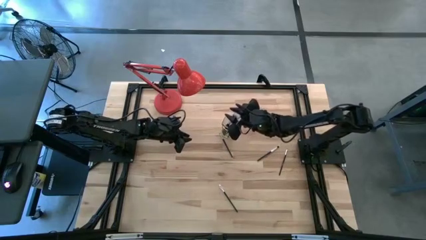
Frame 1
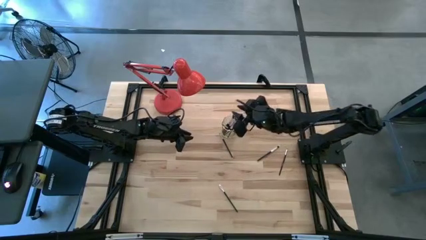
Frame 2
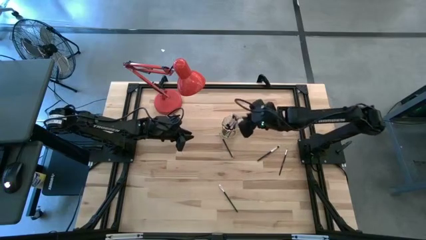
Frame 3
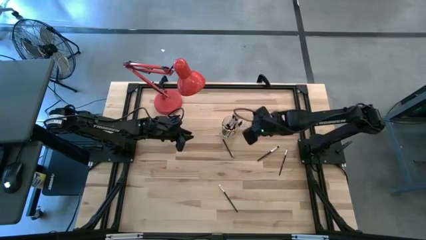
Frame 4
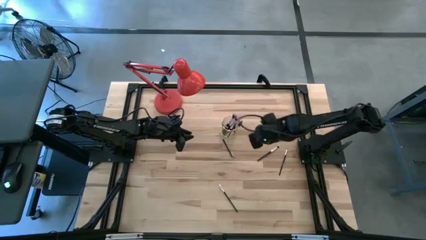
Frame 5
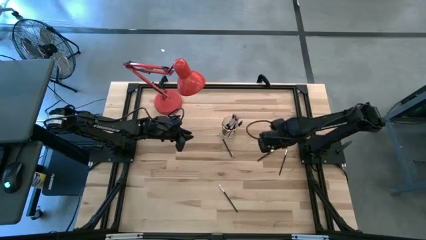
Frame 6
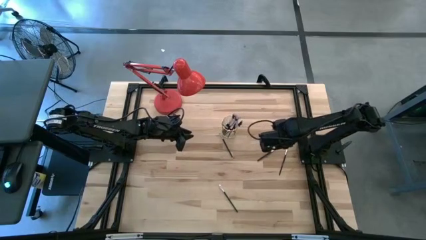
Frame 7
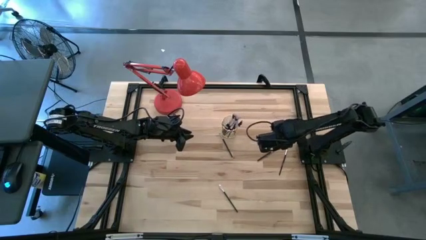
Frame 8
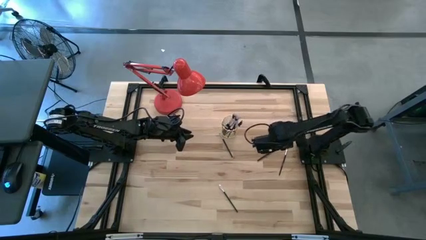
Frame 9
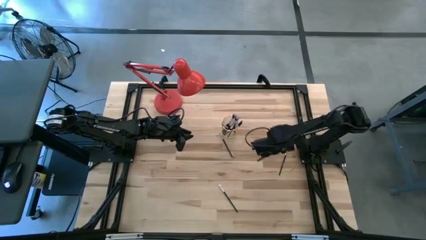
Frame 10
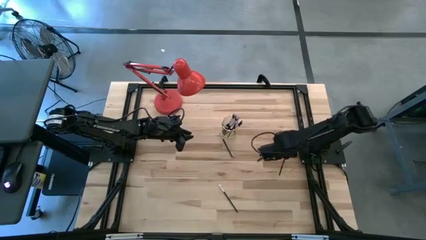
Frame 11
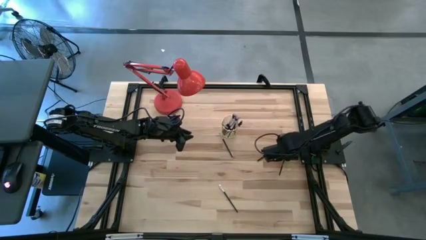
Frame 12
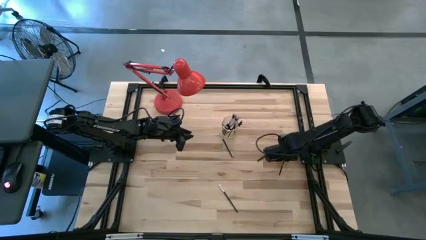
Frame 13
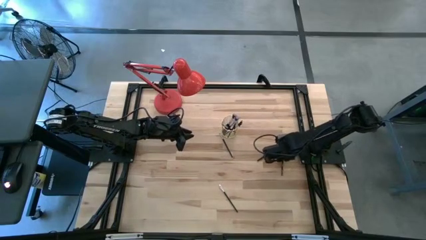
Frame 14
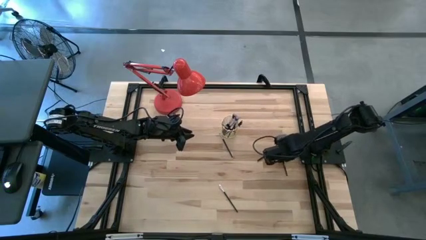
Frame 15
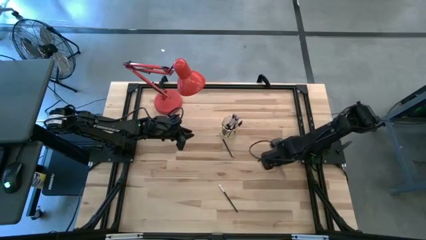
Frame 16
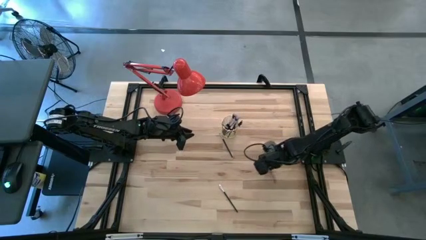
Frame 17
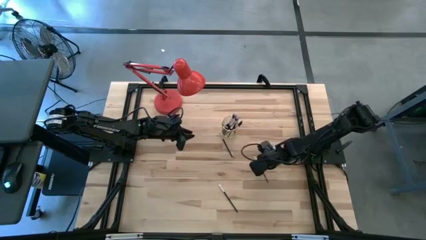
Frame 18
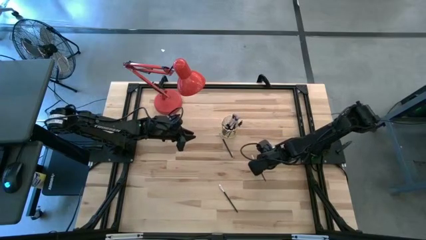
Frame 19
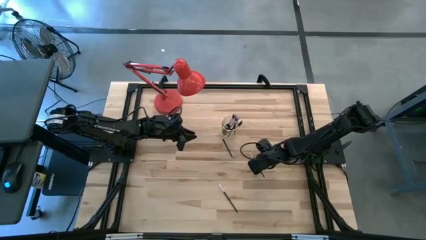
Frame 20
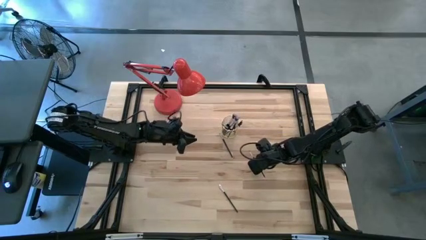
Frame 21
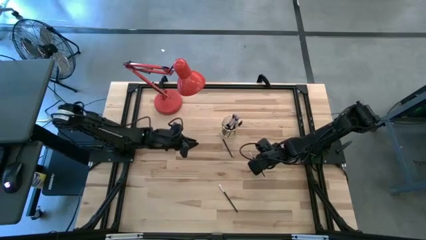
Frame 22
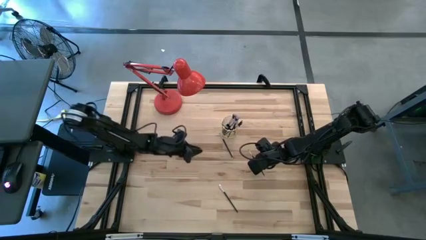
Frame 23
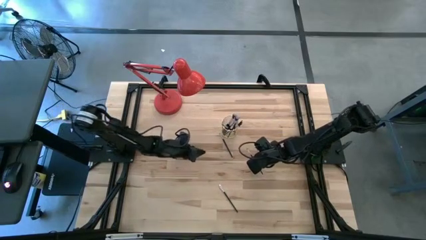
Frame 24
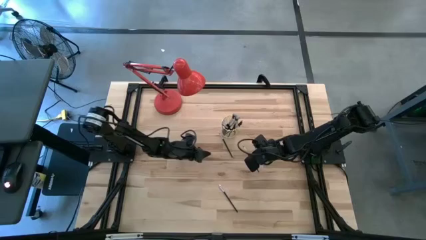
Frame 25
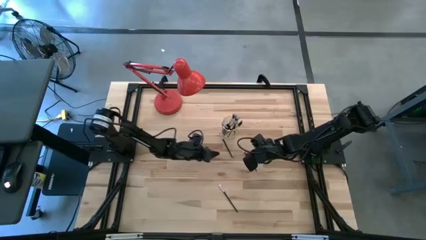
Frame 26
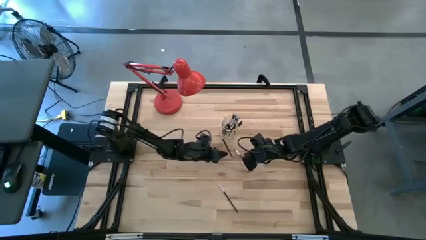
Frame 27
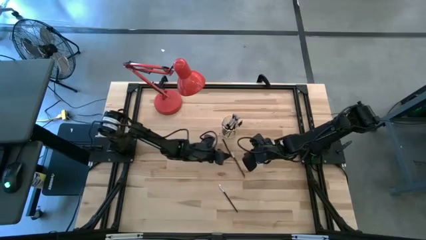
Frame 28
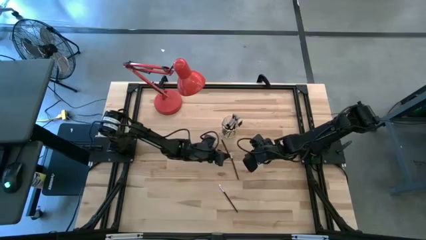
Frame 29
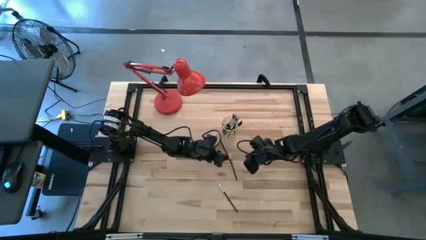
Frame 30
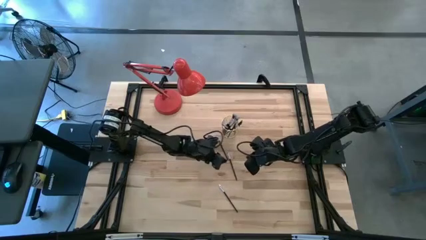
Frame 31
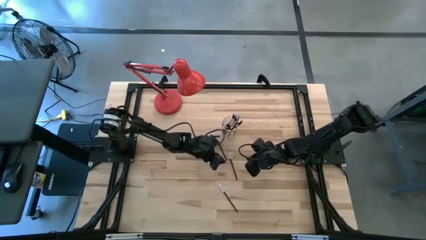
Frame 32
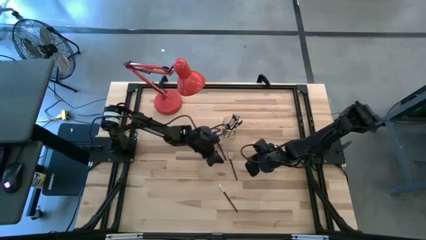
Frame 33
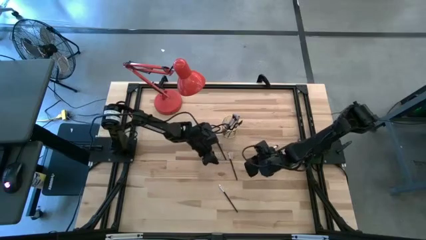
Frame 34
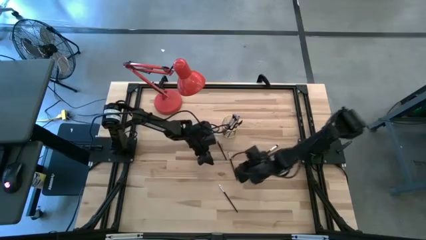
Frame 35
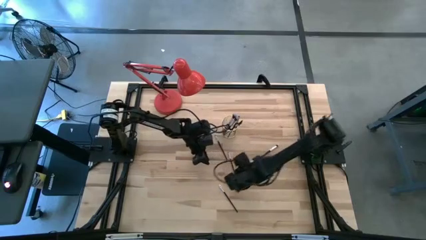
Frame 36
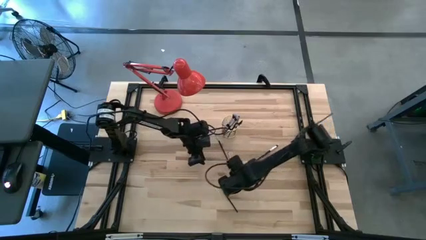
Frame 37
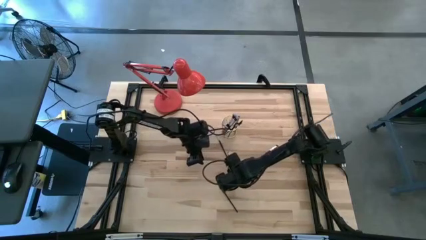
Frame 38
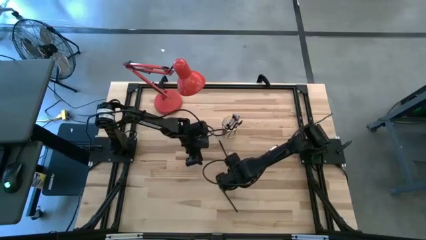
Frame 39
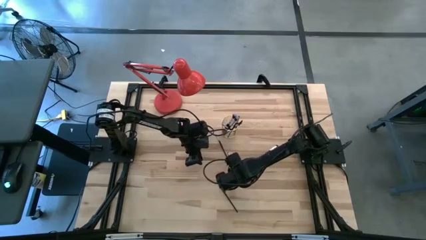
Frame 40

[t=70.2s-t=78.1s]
Task: Put items in baskets/containers
Put the black eyeshadow brush into the yellow container

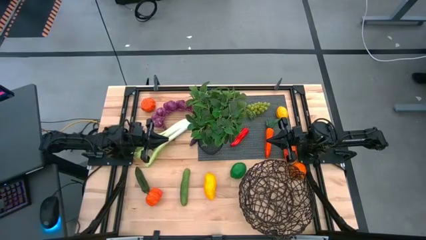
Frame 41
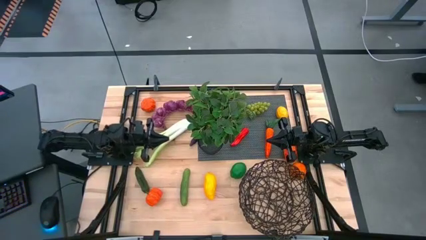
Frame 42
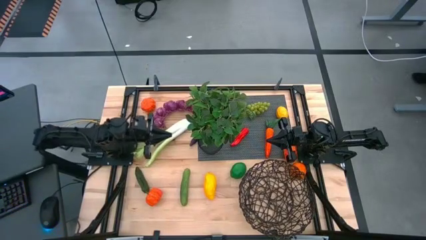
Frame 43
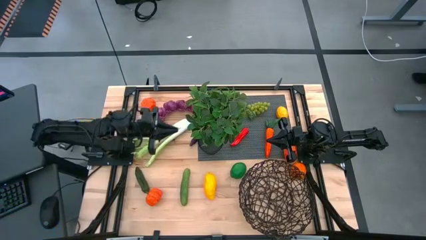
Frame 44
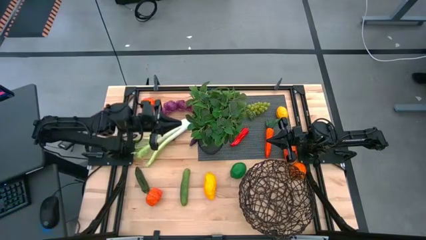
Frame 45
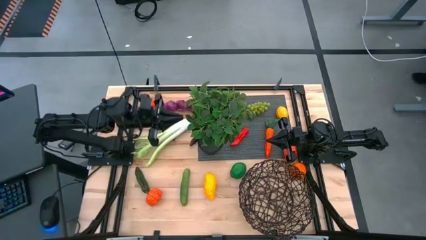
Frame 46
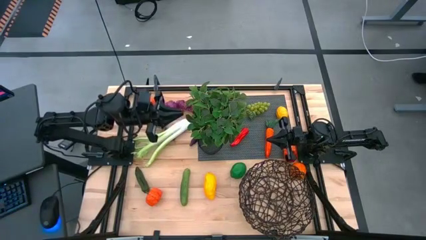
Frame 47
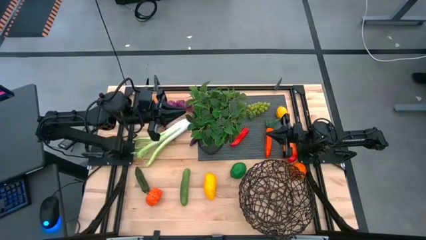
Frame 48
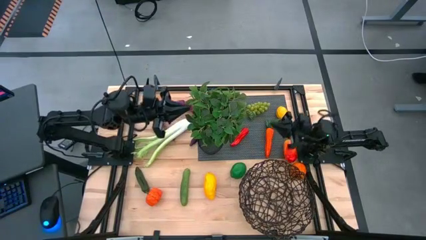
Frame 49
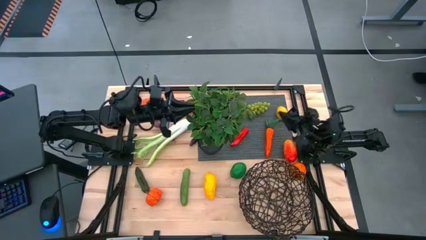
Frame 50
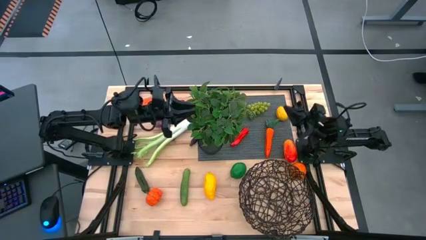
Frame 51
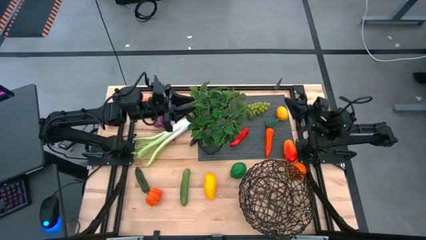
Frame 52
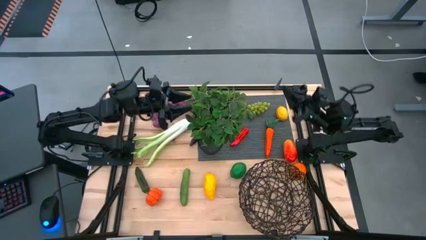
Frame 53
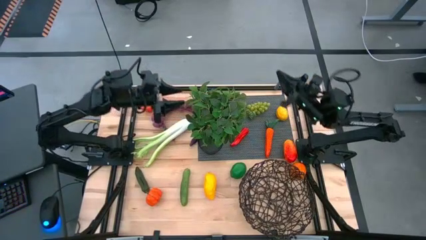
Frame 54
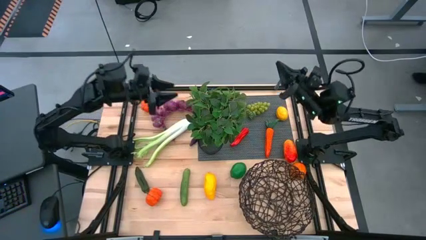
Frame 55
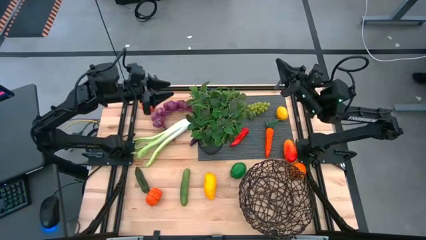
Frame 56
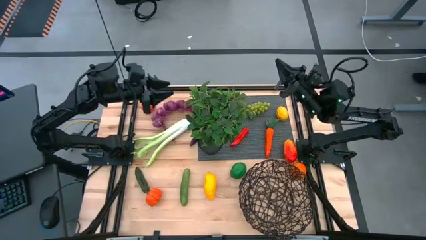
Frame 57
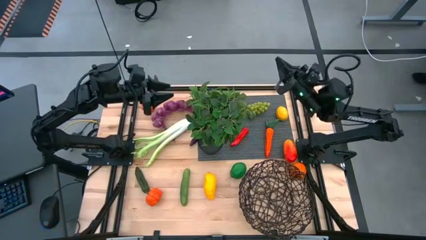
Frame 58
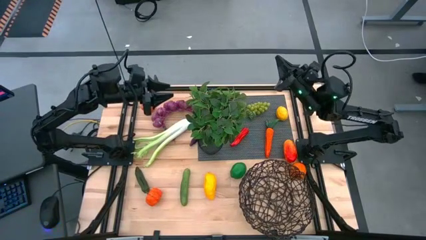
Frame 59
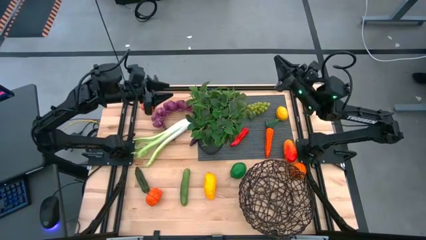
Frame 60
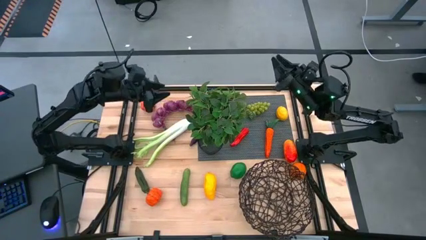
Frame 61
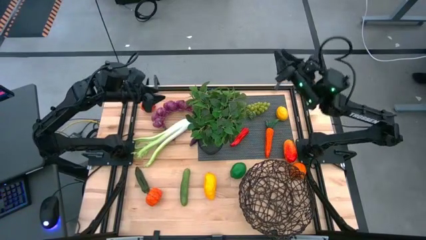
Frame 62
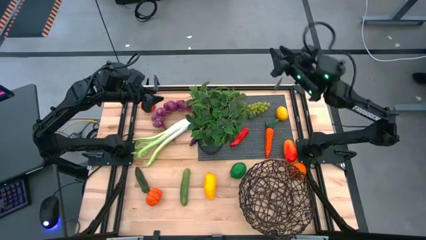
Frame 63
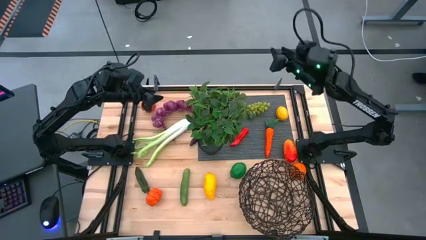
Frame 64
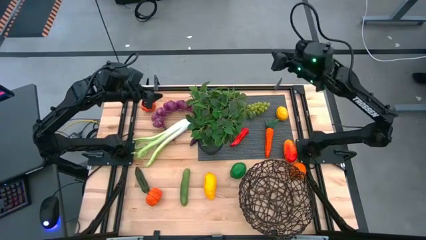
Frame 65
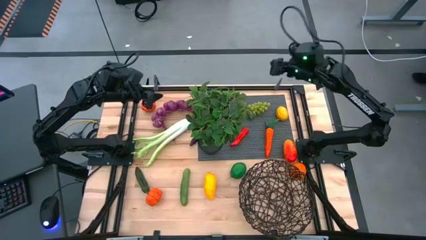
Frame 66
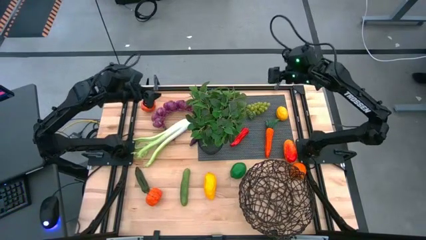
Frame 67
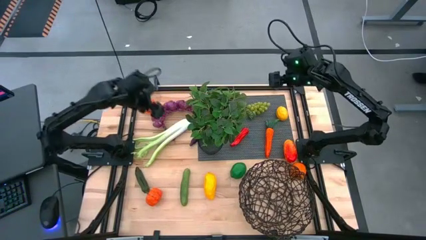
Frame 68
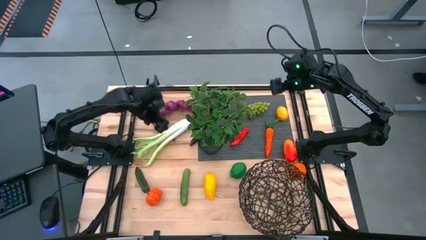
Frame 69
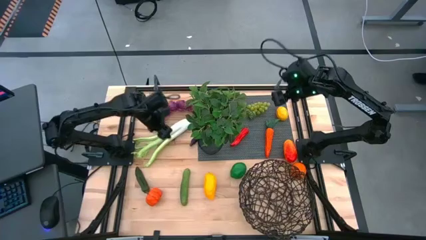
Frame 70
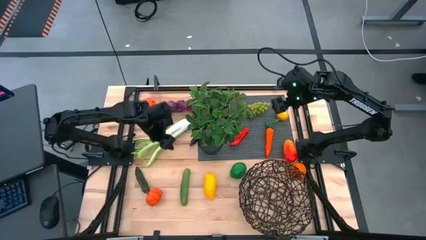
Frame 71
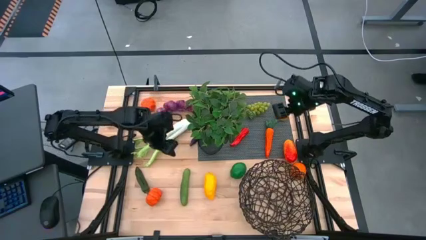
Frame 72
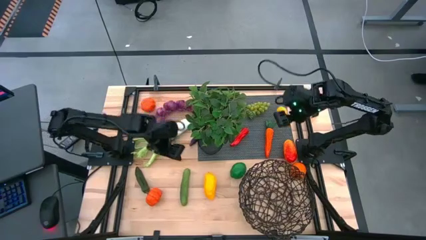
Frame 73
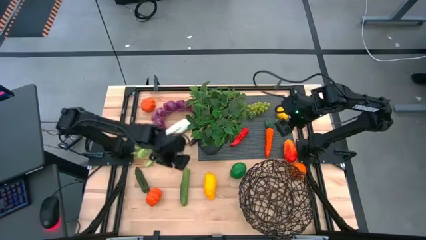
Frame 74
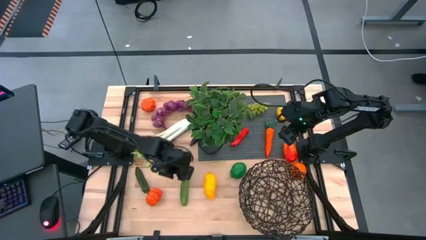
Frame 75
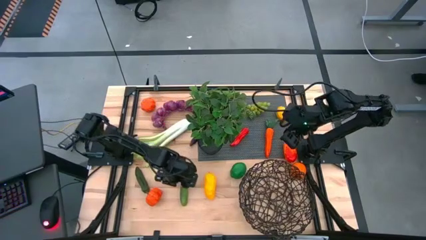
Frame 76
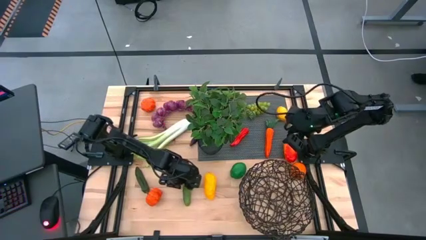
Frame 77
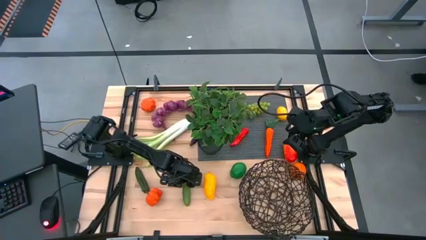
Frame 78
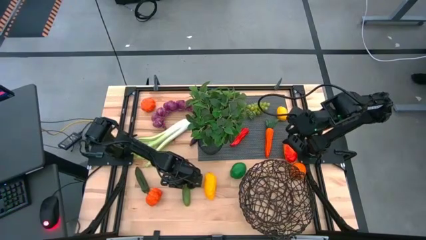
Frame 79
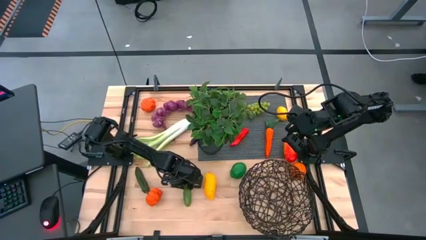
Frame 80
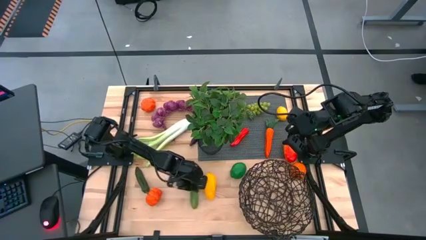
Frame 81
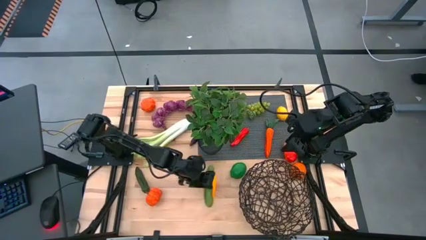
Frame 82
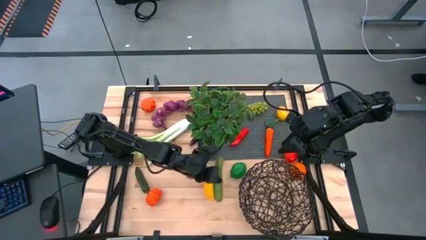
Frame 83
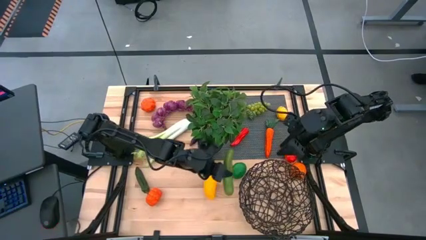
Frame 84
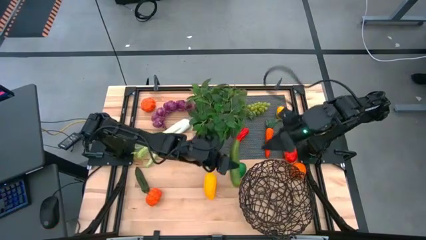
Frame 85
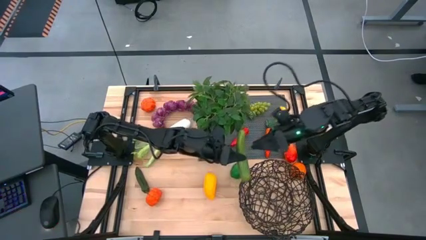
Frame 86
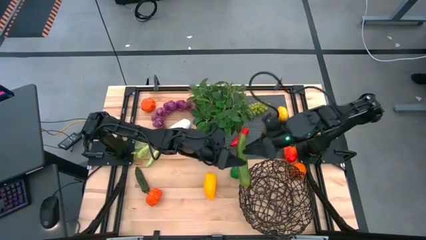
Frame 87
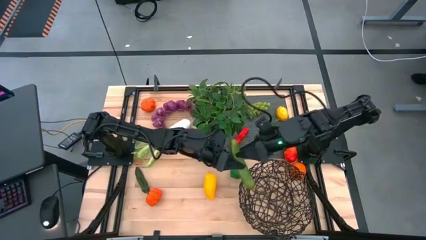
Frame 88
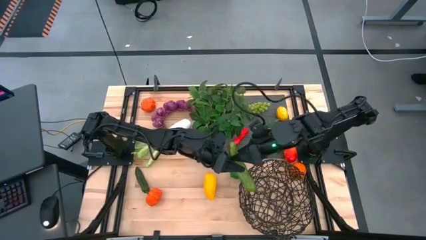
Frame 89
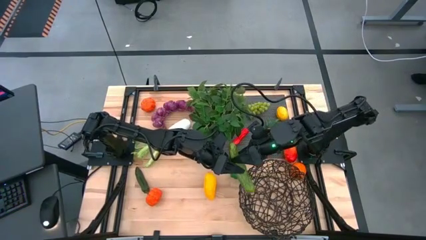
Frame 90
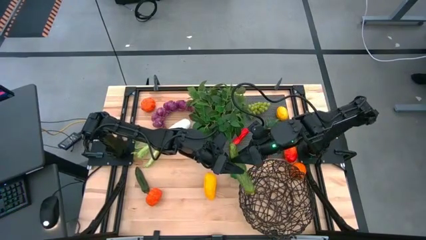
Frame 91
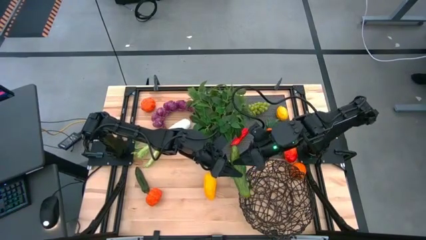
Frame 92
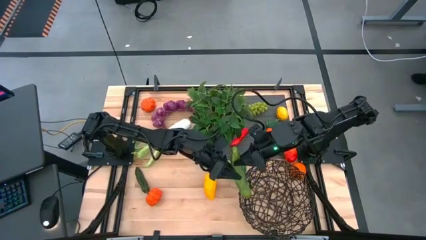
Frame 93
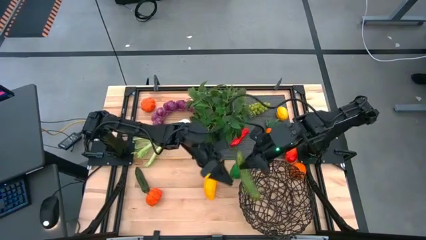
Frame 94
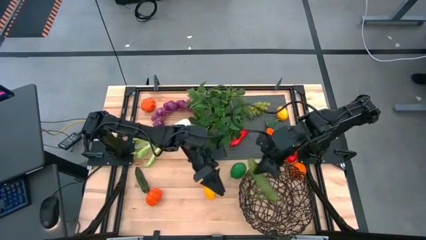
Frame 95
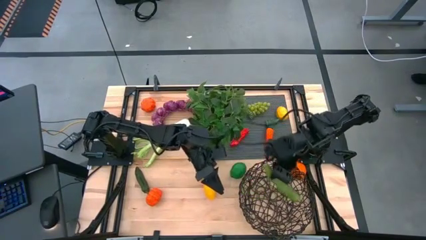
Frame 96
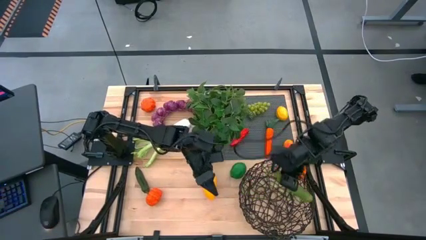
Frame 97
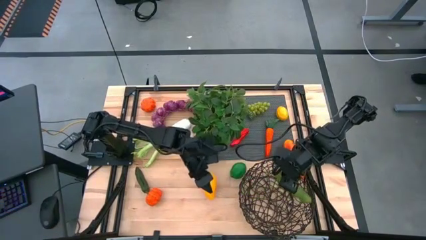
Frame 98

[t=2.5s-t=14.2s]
Task: Build produce basket
Put the bottom green cucumber into the brown wire basket
